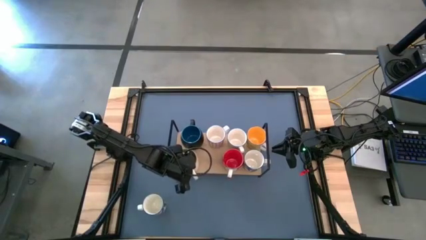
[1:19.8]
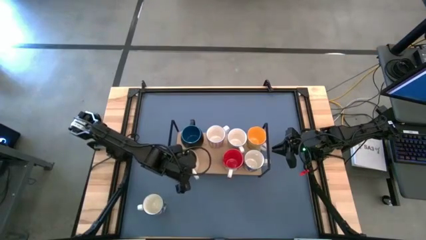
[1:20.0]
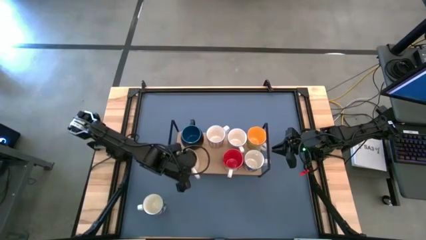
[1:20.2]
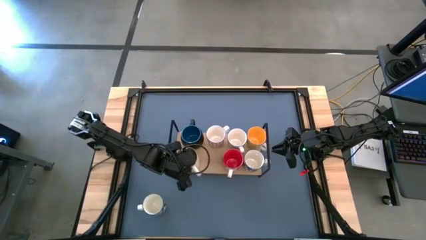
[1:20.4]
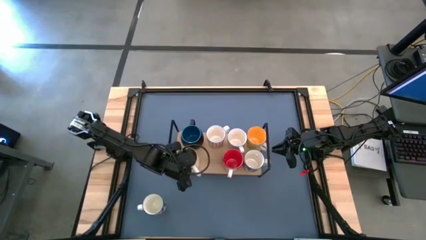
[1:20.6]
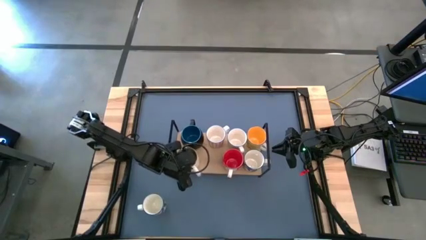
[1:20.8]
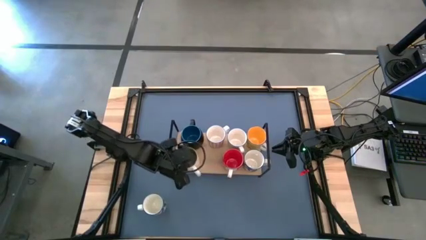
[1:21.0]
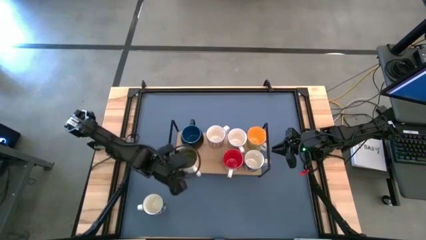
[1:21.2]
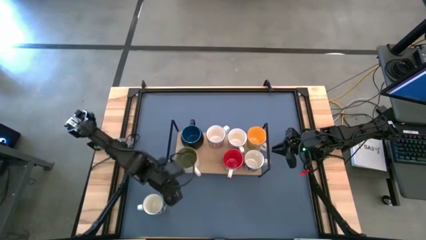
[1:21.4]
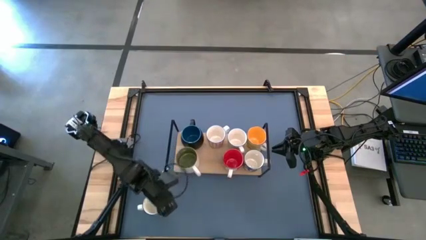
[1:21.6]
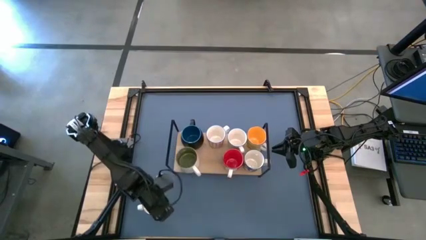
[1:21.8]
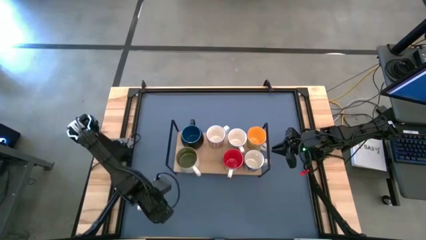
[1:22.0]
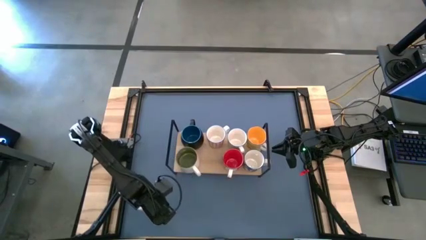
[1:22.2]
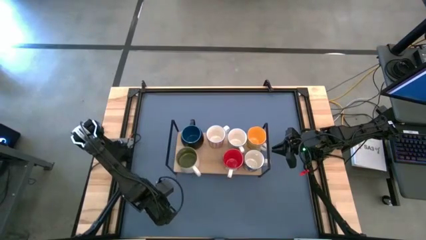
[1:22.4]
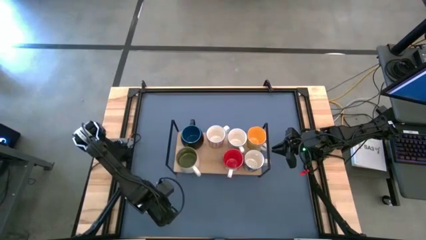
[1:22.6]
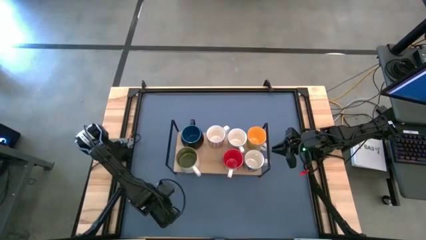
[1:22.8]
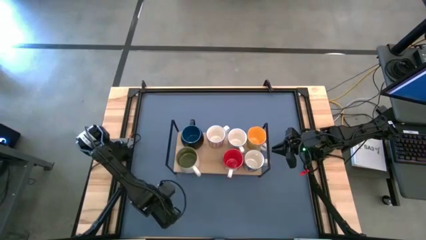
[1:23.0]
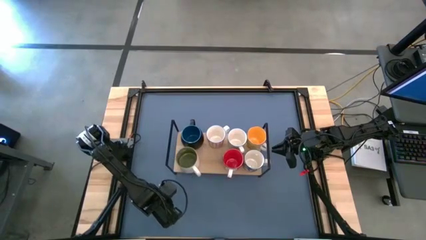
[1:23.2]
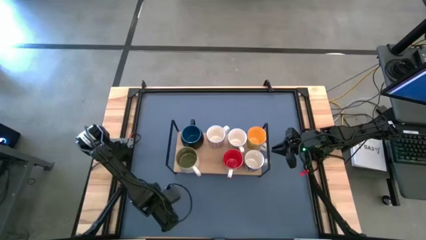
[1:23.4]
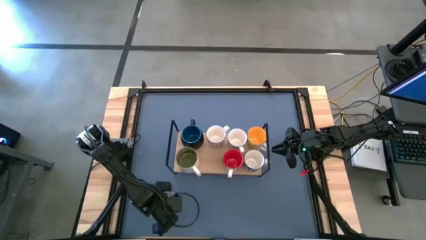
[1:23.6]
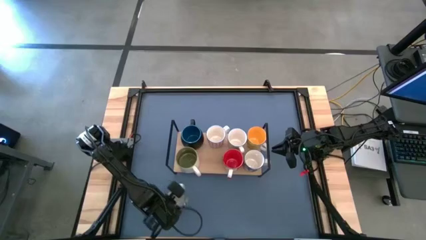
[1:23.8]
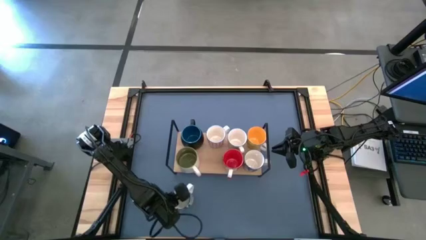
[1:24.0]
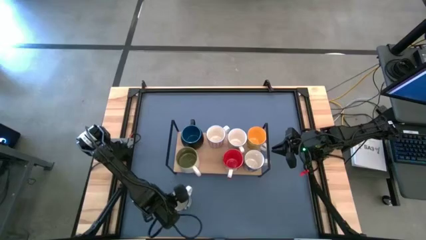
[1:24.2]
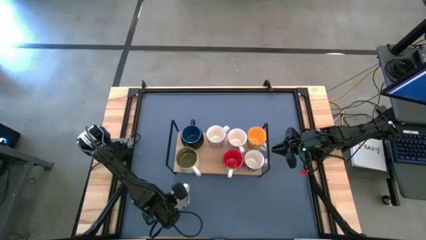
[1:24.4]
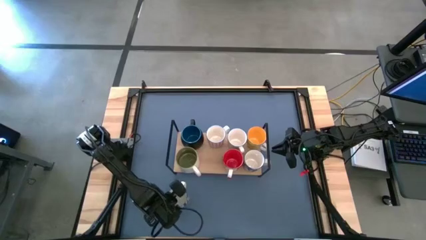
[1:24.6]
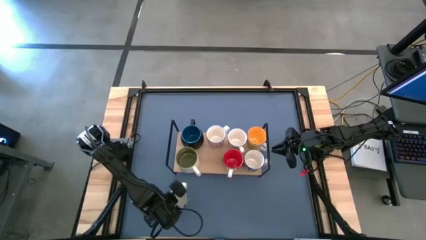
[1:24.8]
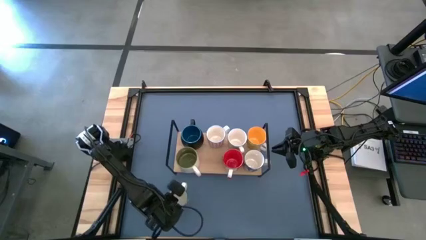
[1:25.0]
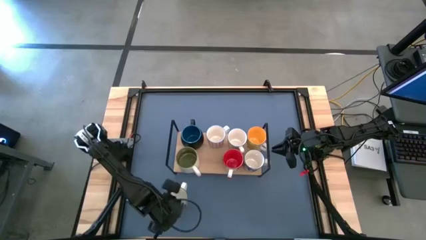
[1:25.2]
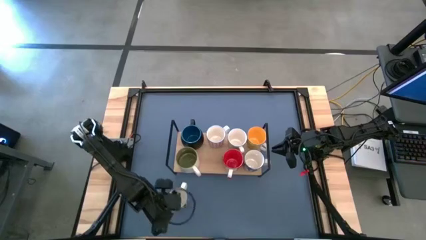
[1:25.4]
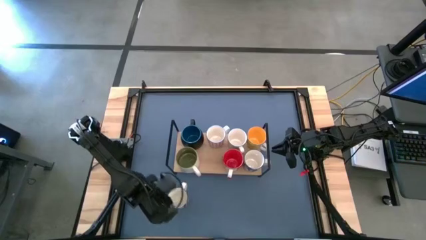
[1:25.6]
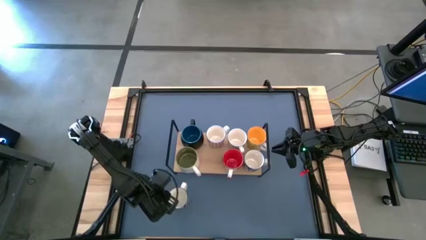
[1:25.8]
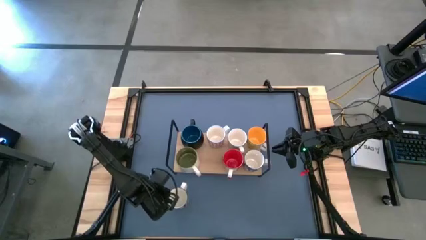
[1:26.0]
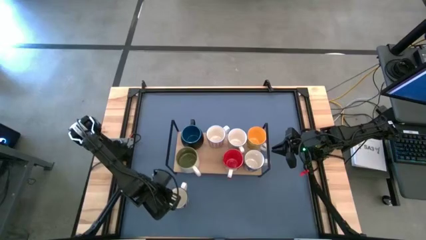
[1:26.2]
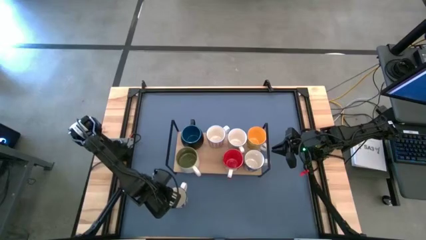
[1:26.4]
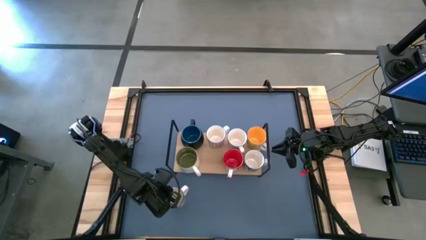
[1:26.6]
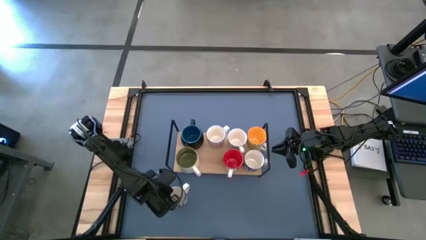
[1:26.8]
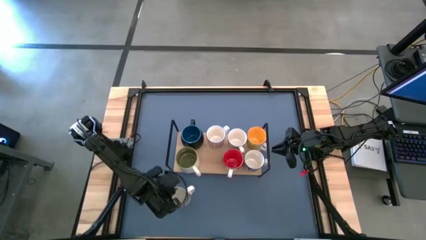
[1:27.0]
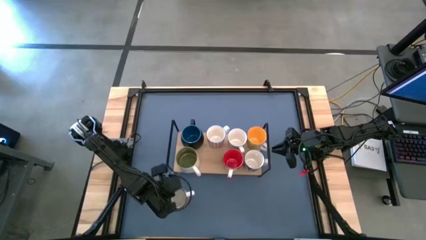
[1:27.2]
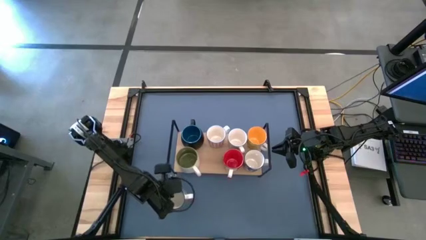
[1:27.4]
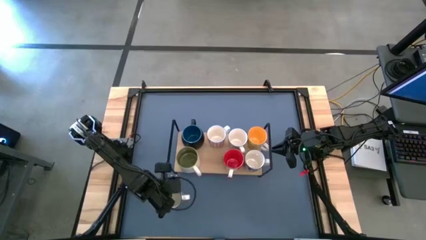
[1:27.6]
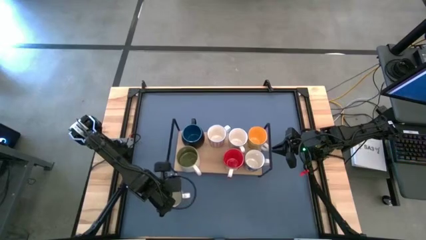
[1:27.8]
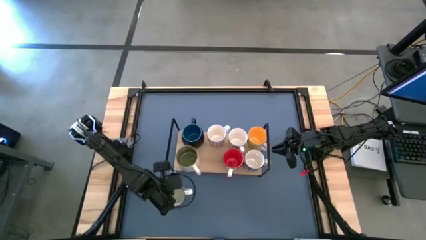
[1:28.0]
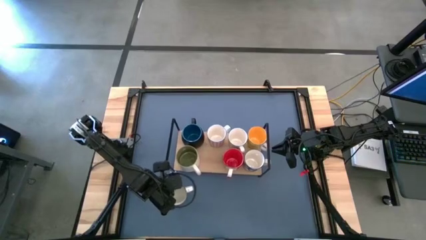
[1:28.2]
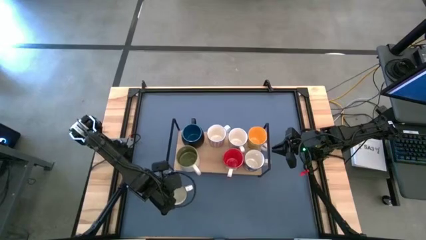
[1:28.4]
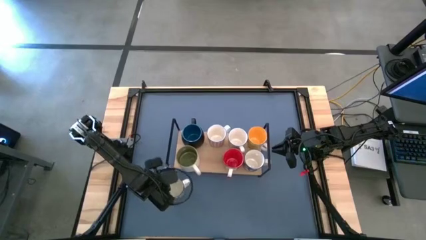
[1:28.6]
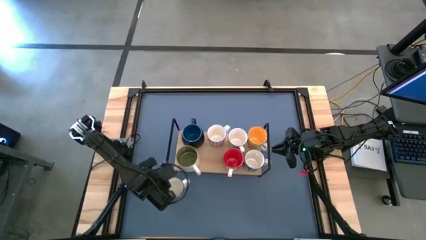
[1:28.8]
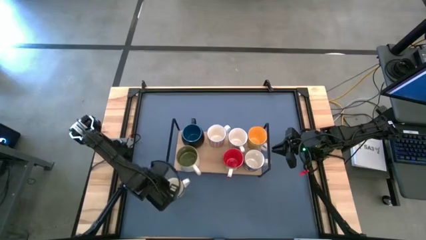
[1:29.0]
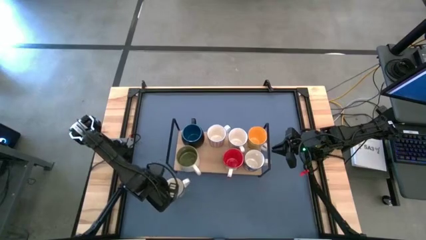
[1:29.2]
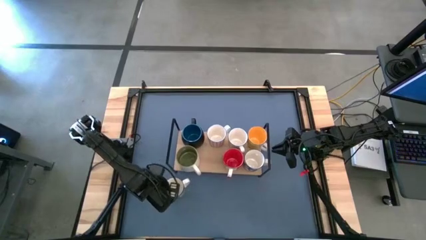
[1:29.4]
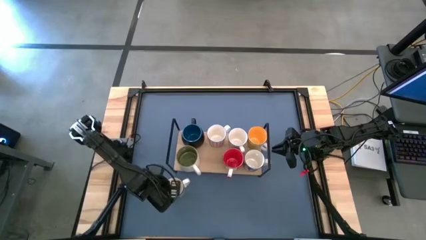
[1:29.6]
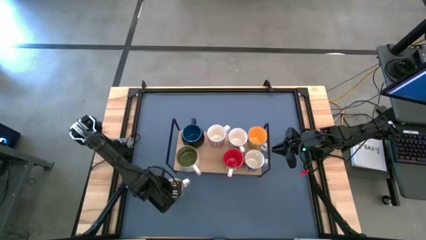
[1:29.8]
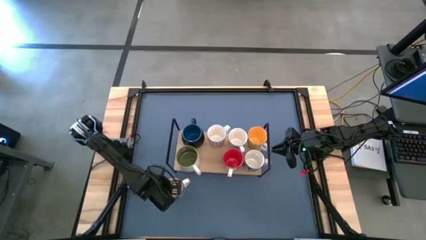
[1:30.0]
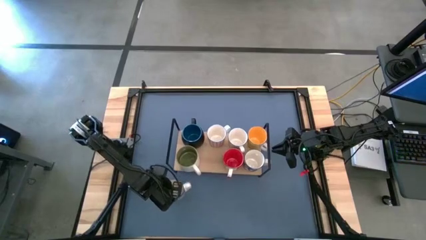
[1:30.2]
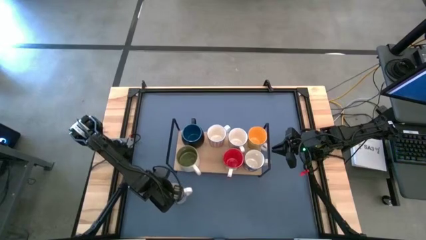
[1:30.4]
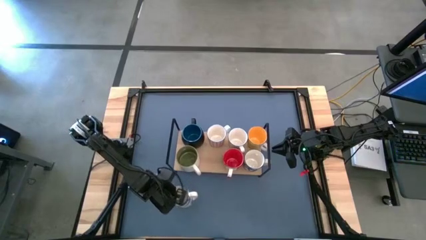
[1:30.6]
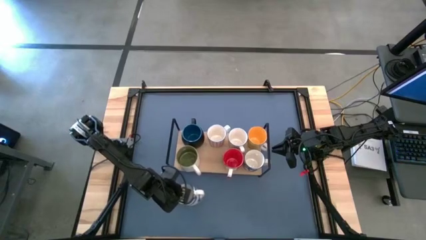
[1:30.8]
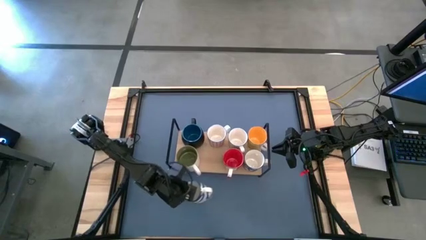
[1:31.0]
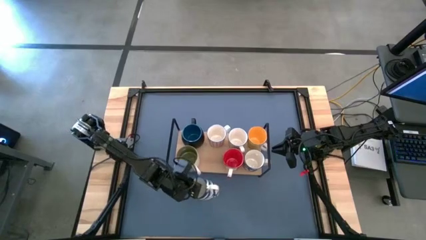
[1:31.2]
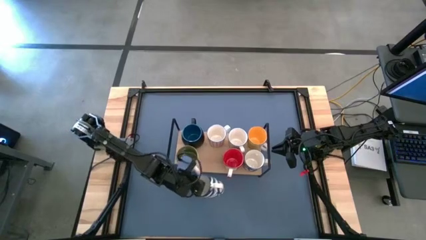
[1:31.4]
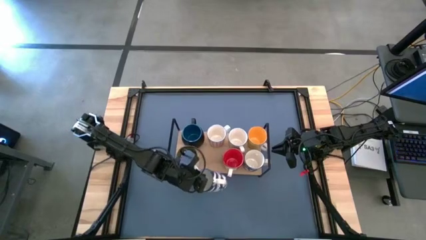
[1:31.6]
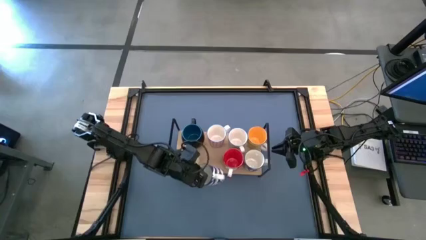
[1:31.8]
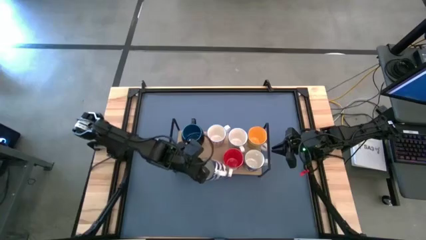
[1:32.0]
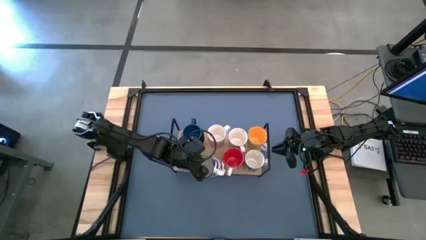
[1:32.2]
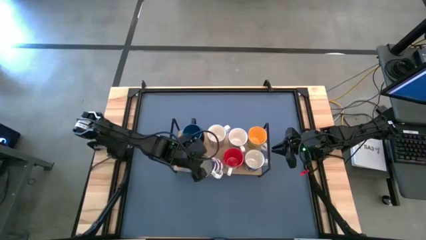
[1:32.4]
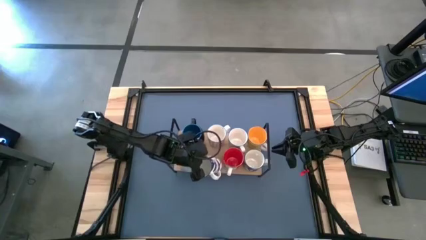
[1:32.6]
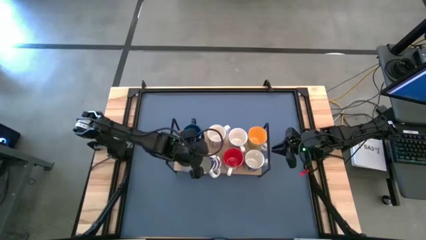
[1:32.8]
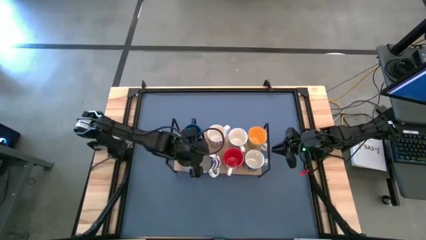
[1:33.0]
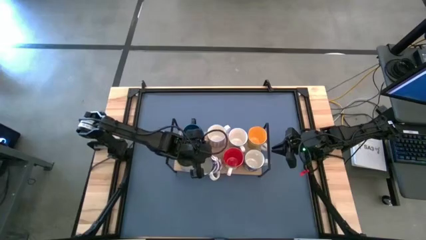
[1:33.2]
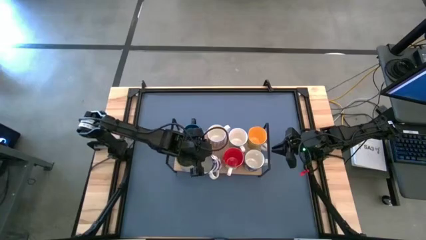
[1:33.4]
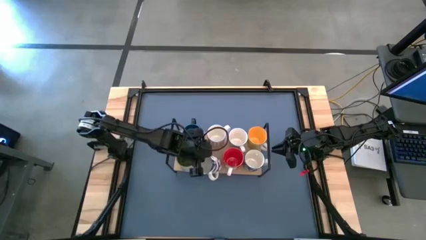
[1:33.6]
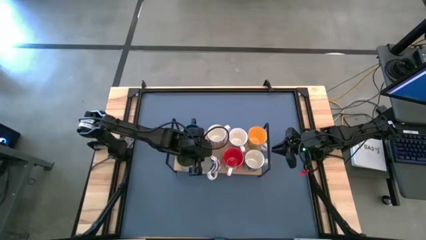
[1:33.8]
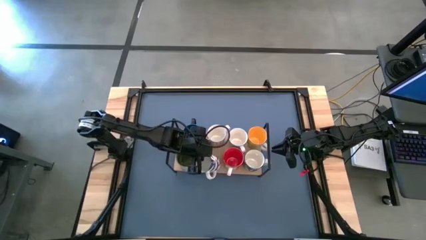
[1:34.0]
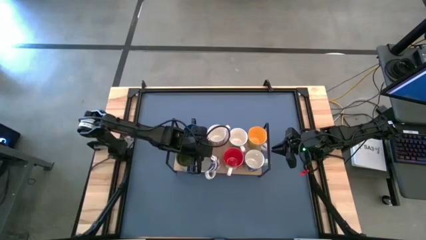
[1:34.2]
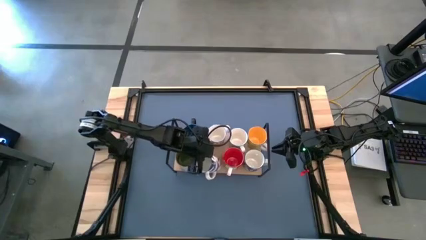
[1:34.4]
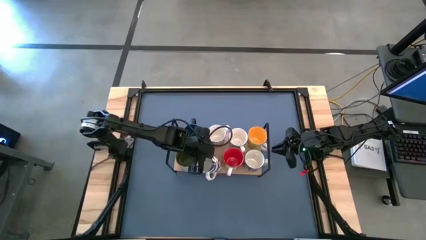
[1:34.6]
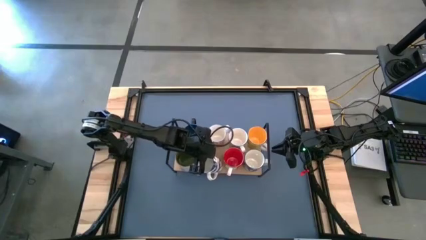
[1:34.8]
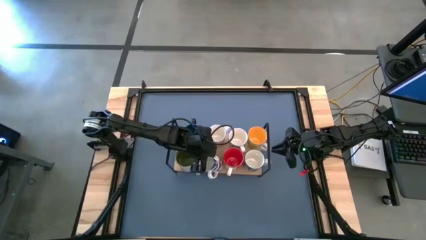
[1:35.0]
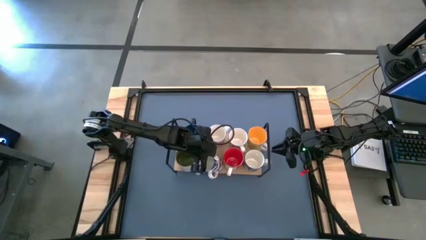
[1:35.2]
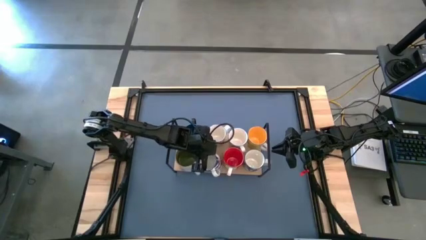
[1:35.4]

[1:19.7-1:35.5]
Task: Place coffee mugs
Put the blue mug on the shelf
